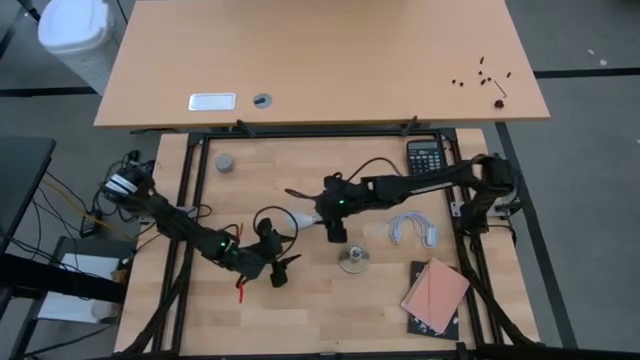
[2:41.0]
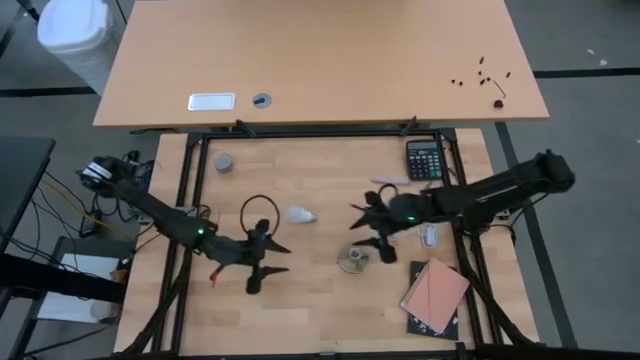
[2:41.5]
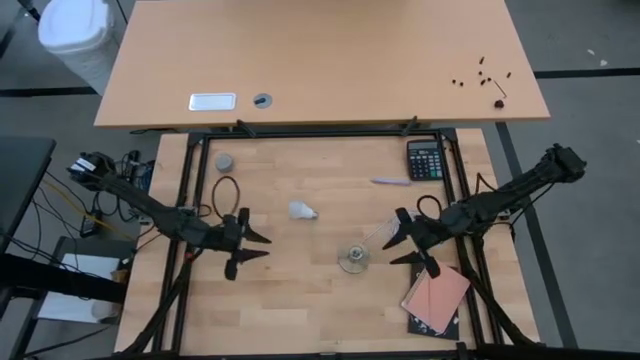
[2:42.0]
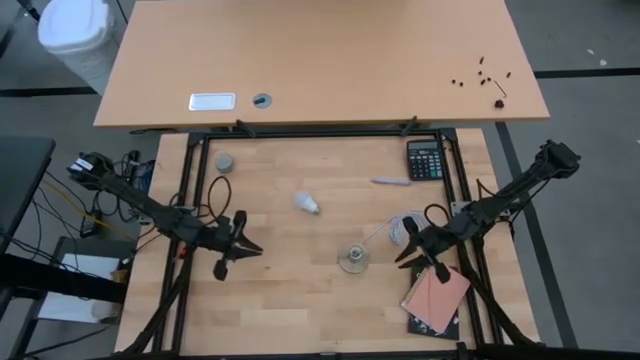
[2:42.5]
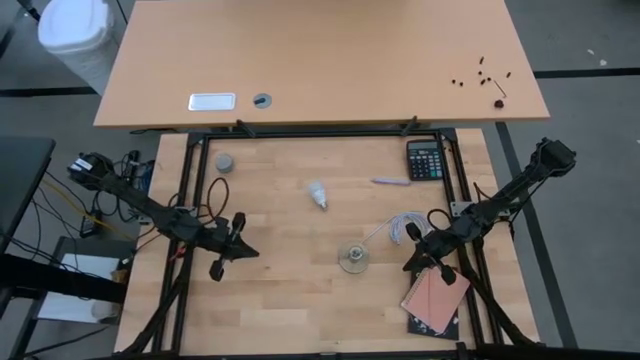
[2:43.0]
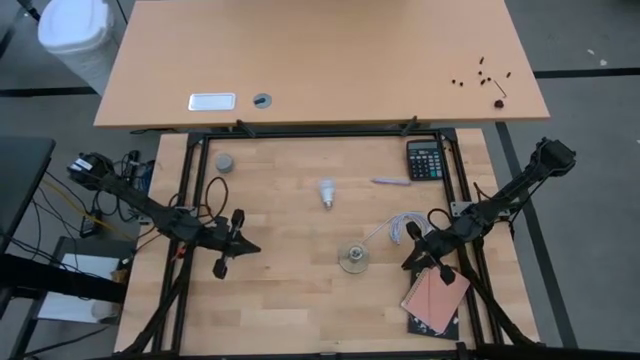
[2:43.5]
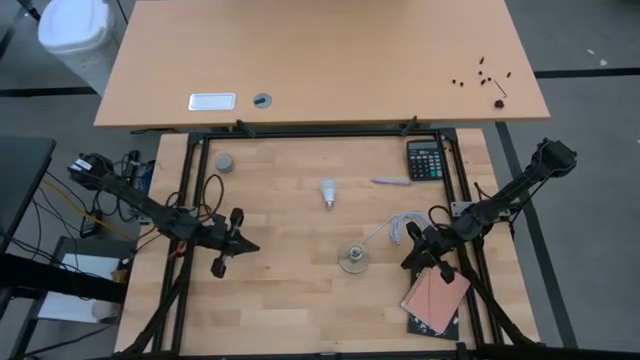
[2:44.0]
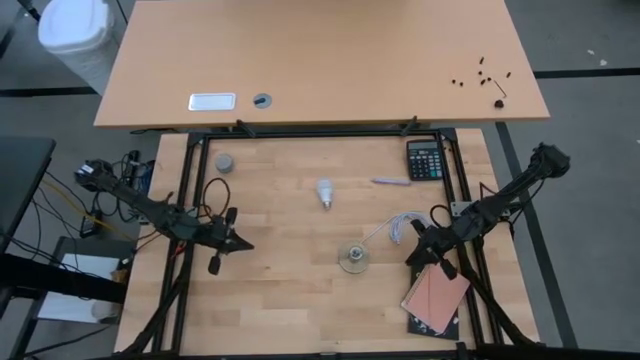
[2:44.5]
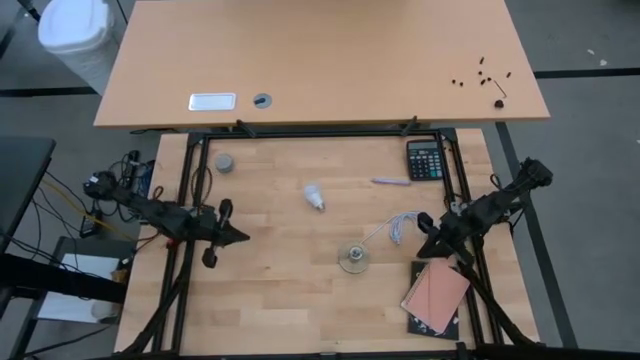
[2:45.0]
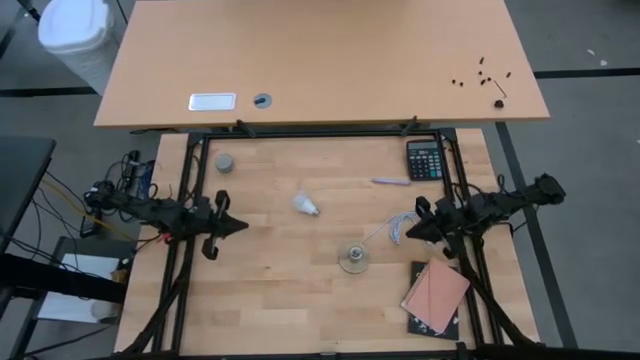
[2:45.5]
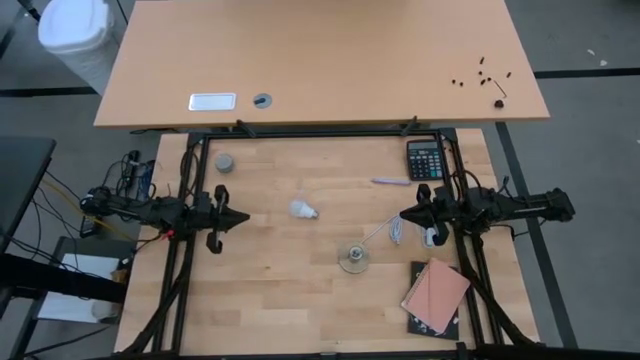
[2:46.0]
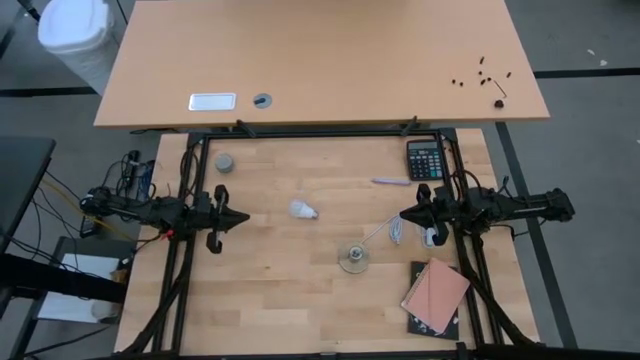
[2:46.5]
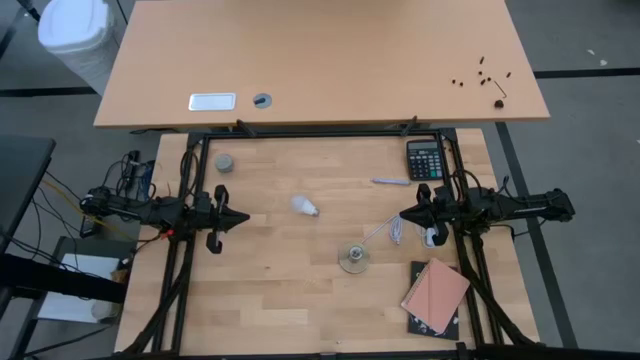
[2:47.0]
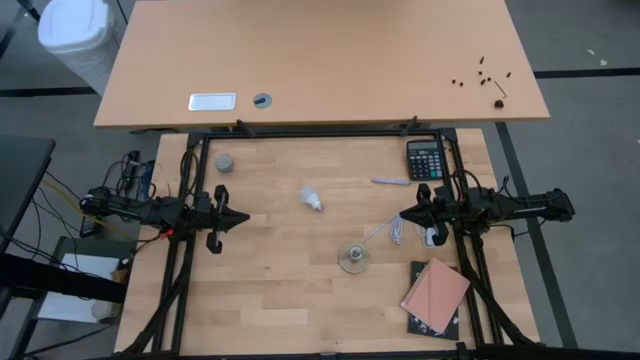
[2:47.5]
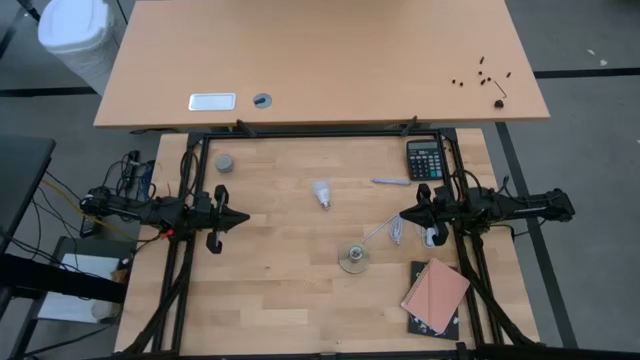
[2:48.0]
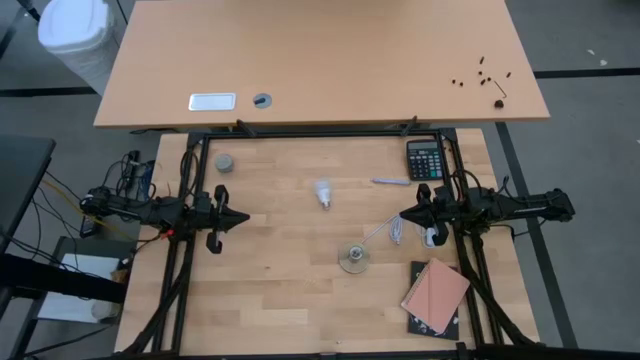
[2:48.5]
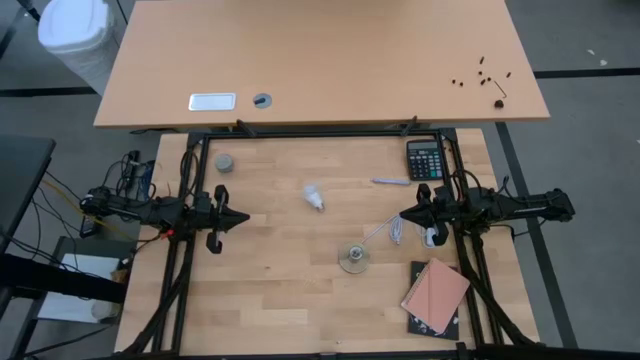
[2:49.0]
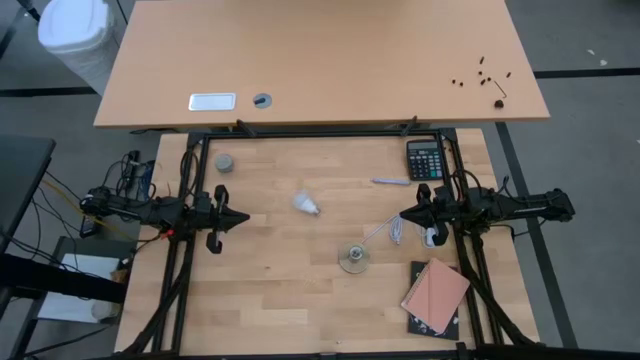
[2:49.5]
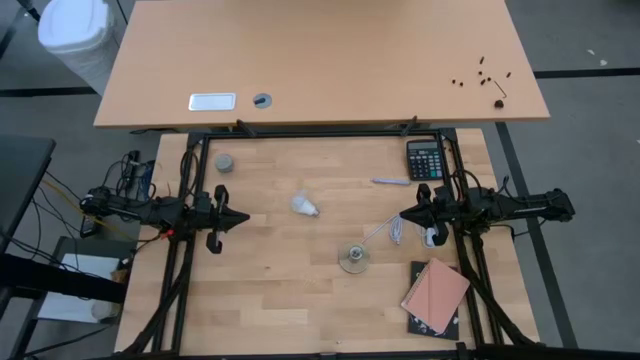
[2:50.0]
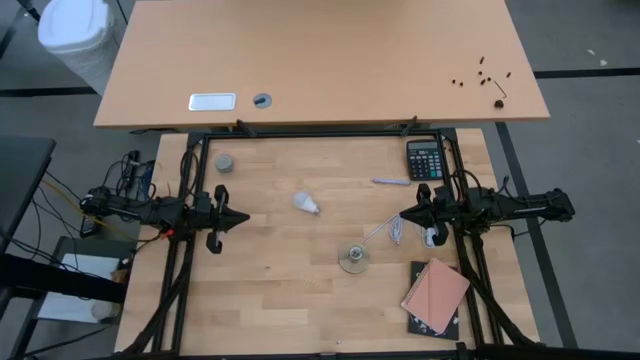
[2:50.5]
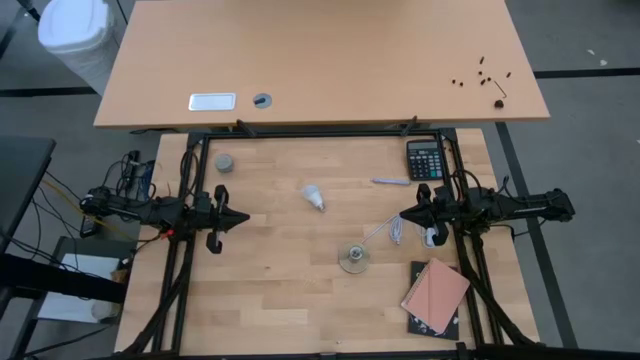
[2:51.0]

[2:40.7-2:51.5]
Task: Screw lightbulb
Return to Home Position

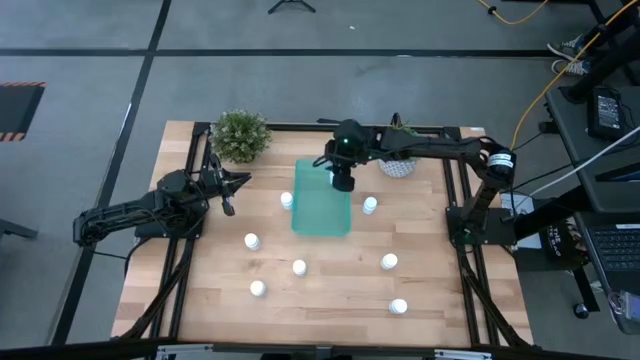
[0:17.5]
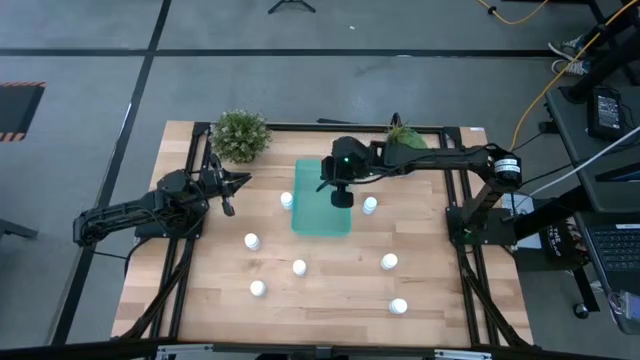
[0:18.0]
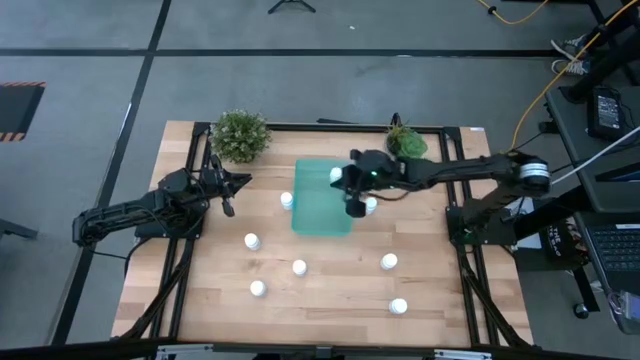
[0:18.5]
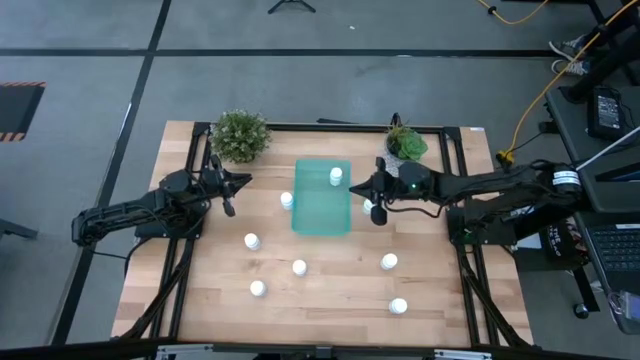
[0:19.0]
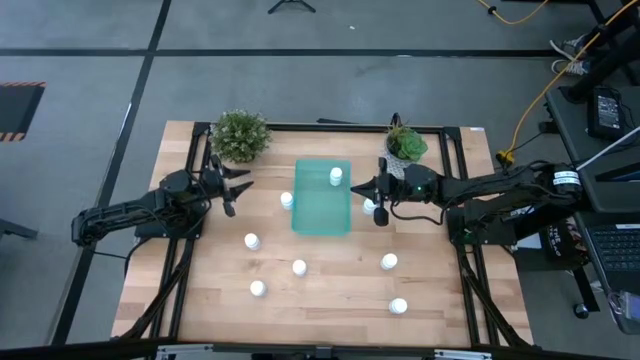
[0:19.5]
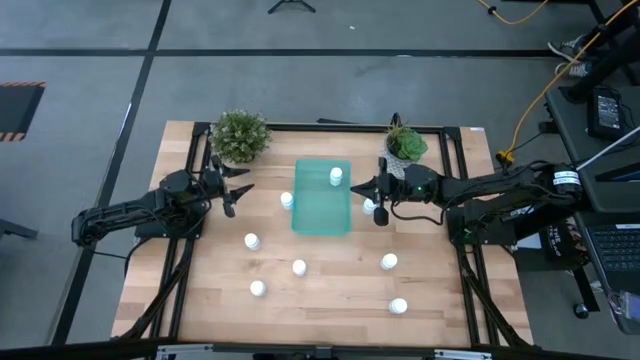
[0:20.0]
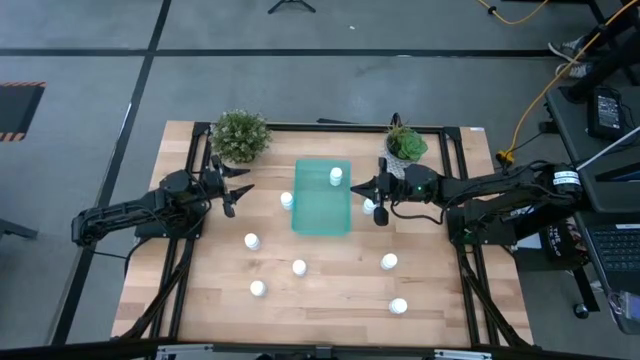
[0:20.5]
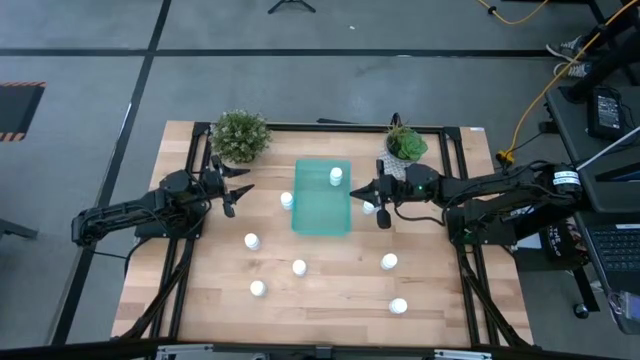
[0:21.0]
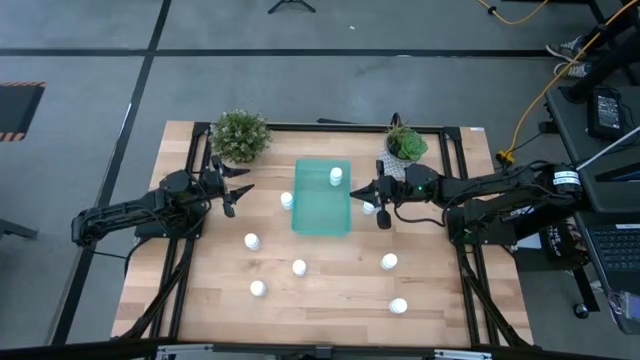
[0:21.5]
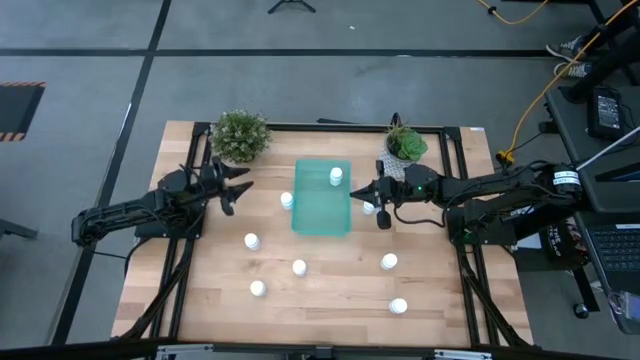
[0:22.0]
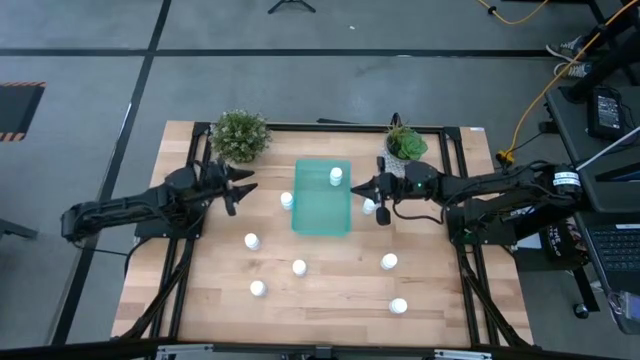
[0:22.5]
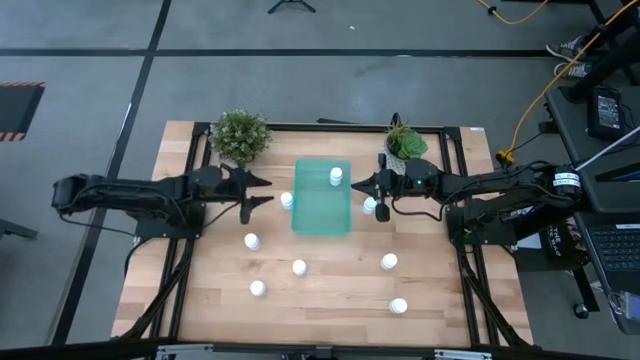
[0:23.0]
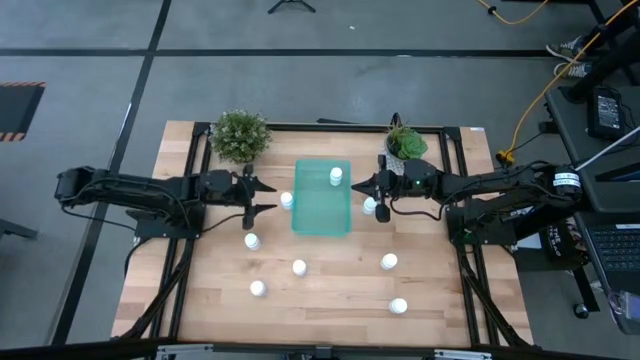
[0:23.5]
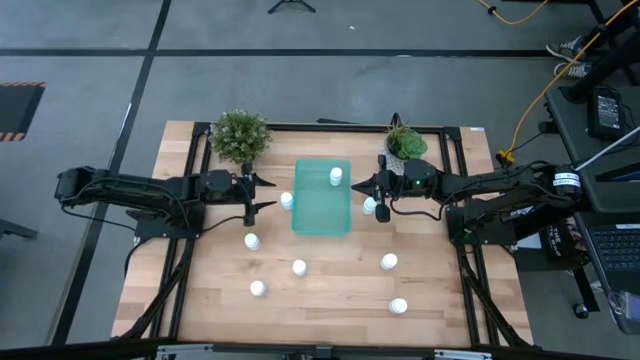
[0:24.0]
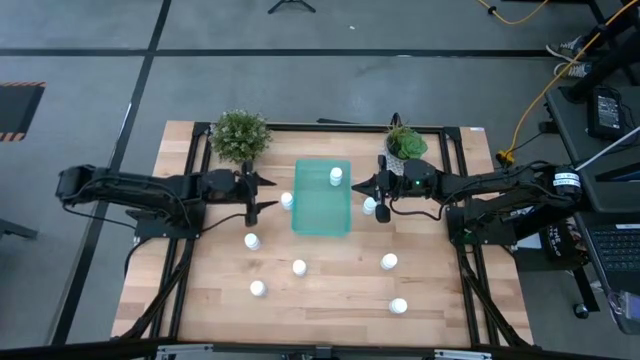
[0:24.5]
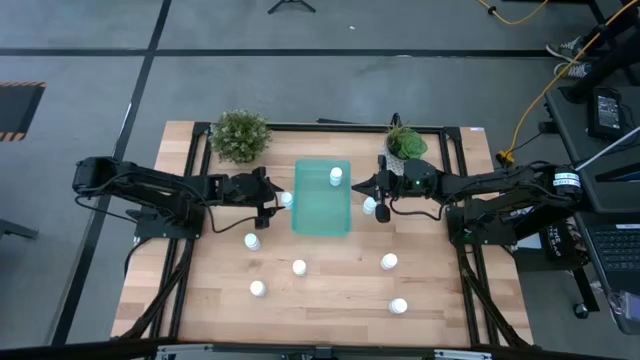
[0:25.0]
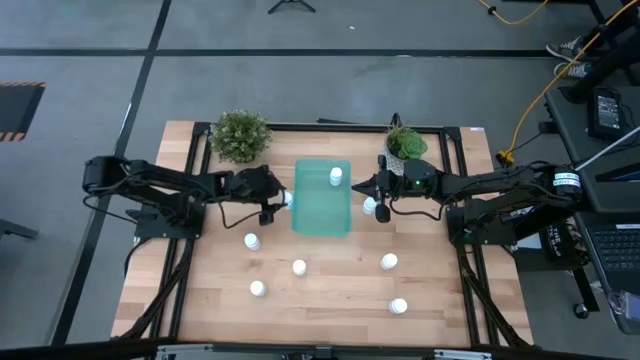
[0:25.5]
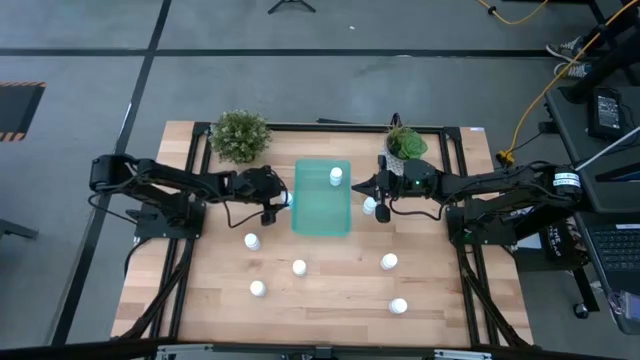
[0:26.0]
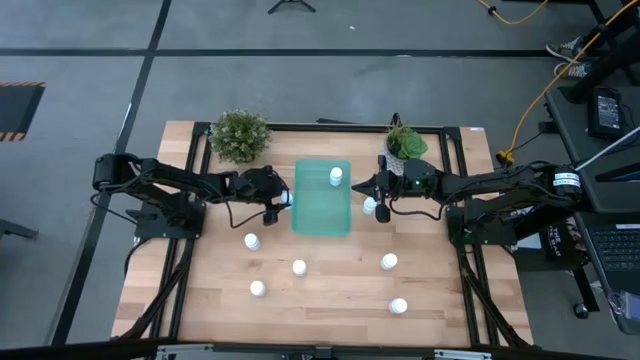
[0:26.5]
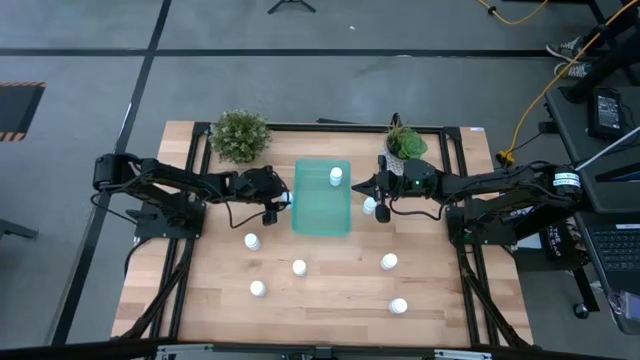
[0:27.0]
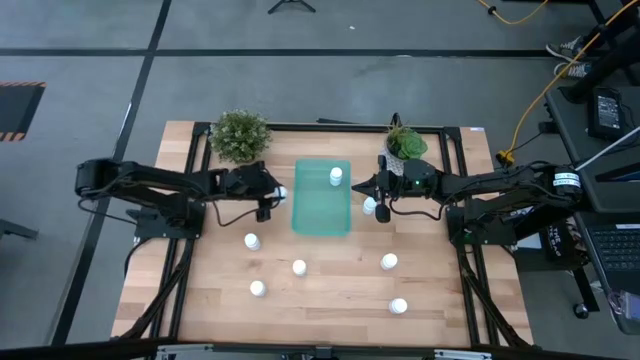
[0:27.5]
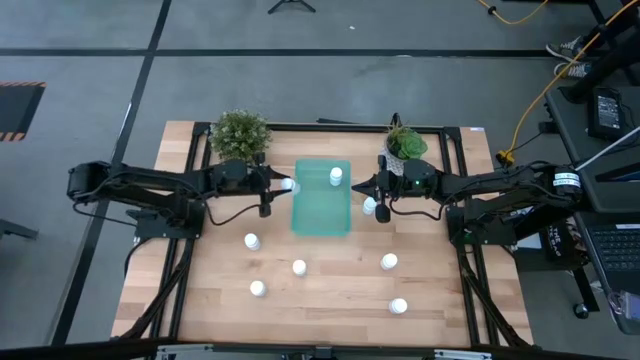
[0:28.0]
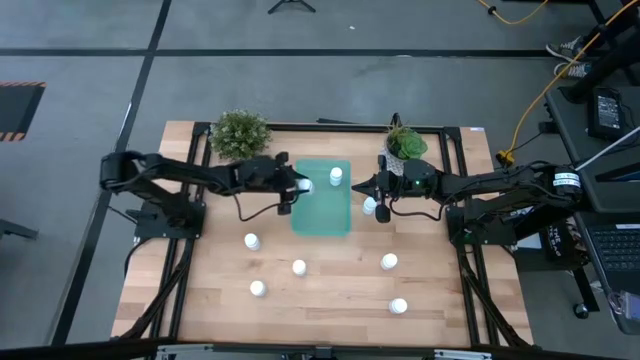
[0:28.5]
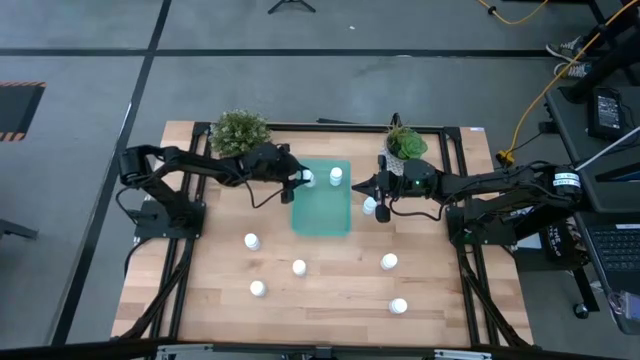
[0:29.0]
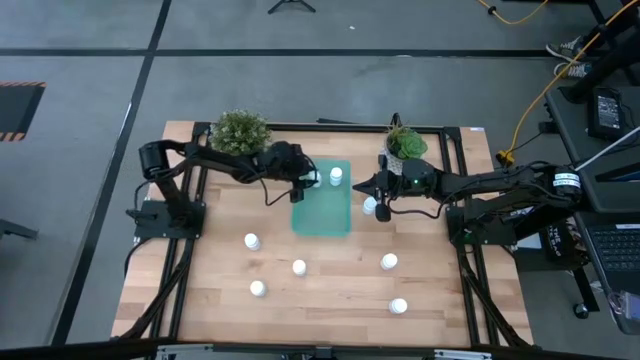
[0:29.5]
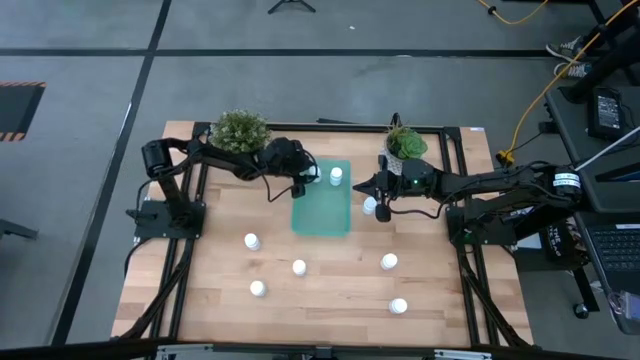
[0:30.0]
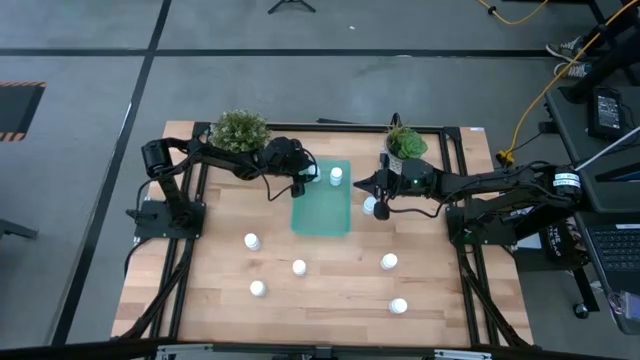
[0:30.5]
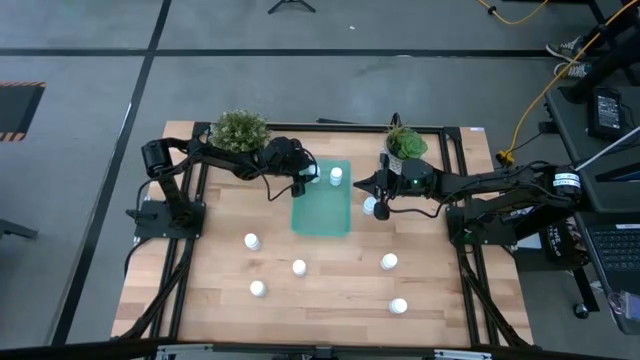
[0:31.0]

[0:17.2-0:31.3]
Task: Pick and place pill bottles into a basket
Put the white pill bottle into the green bin
